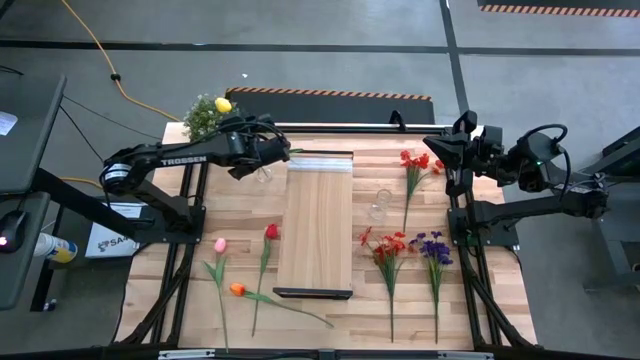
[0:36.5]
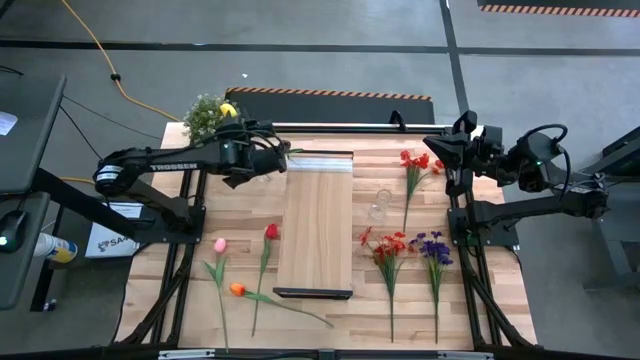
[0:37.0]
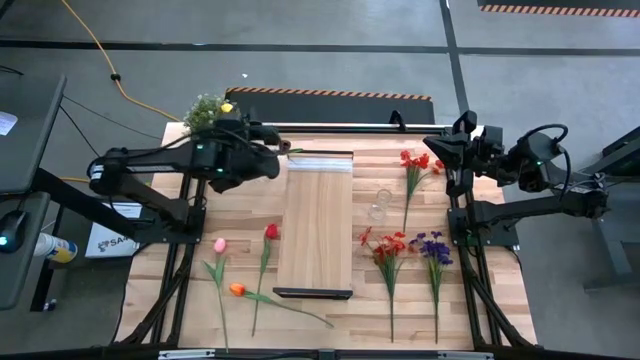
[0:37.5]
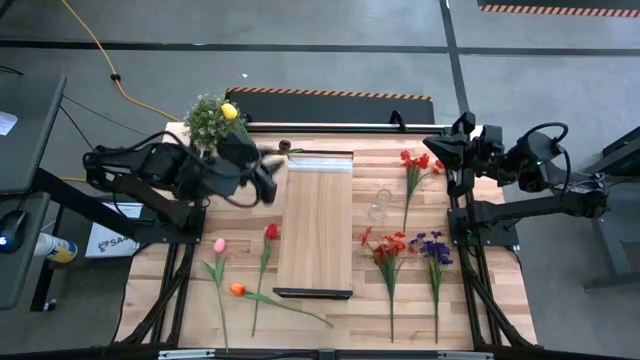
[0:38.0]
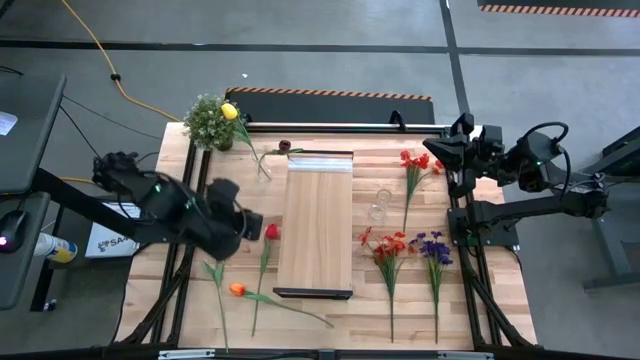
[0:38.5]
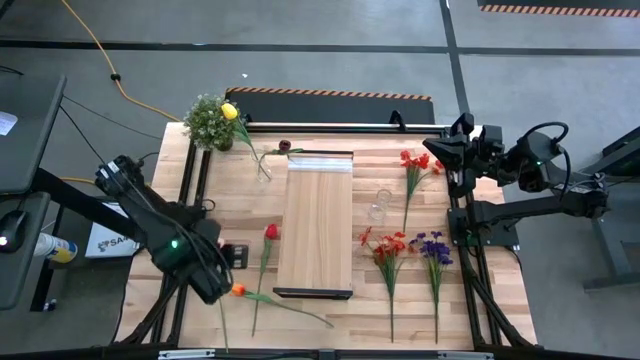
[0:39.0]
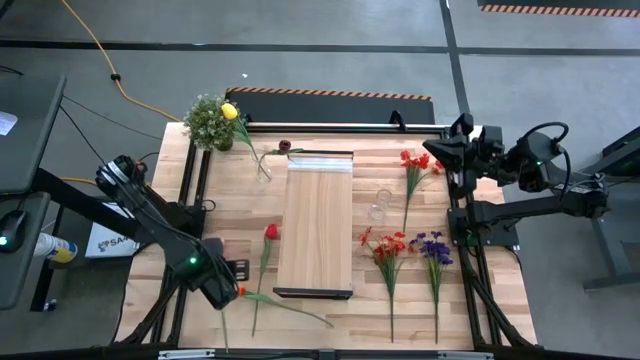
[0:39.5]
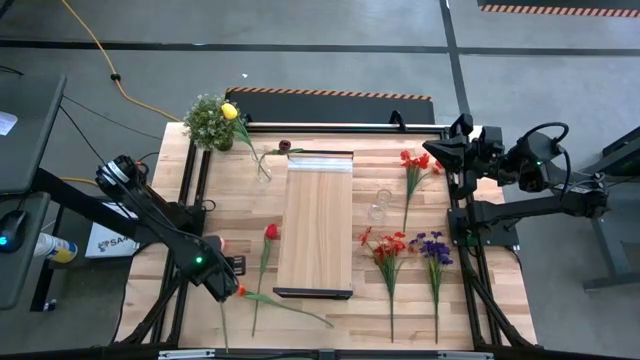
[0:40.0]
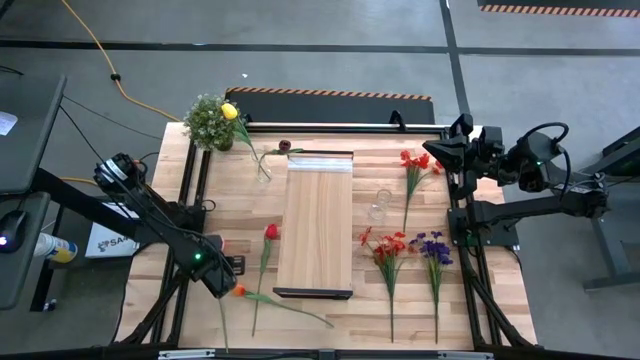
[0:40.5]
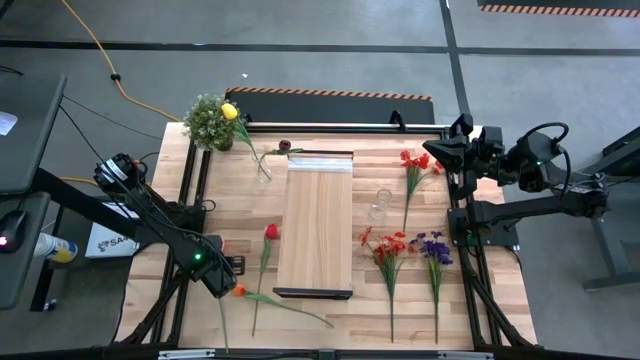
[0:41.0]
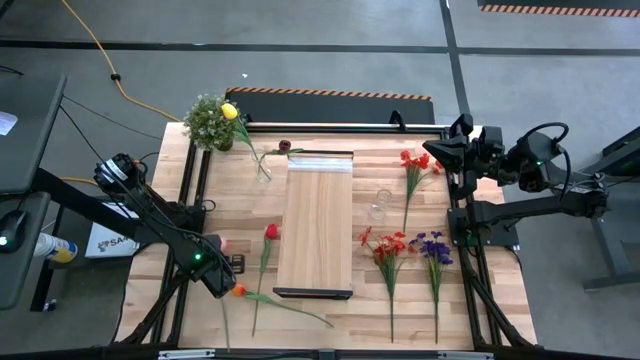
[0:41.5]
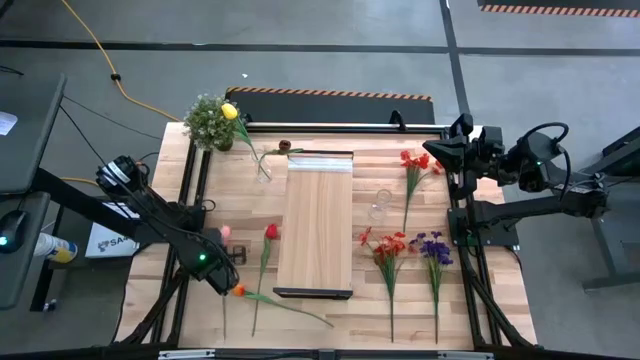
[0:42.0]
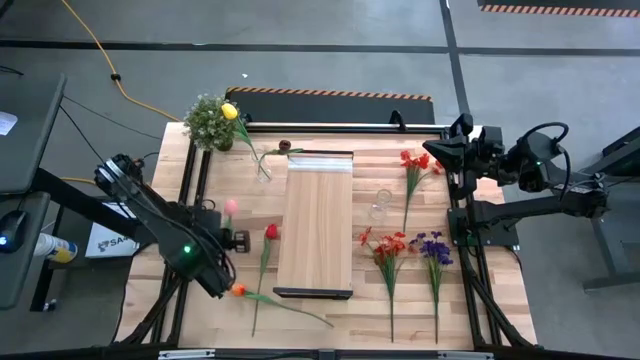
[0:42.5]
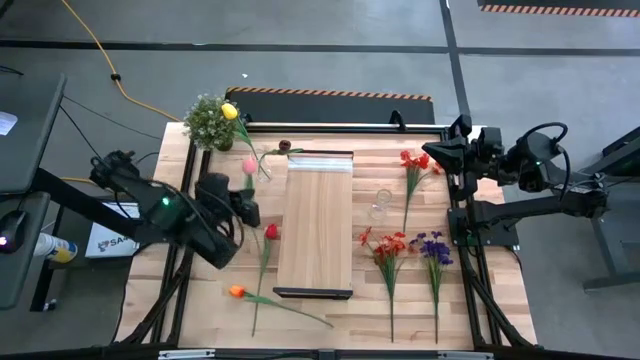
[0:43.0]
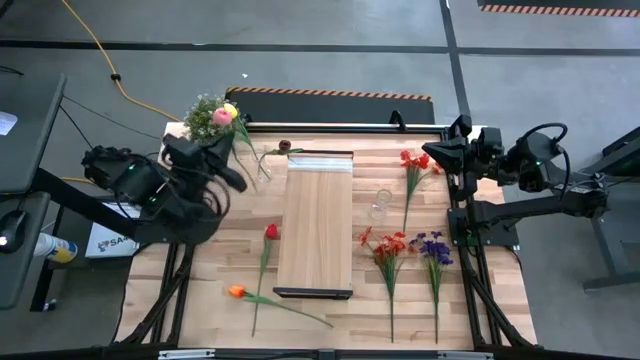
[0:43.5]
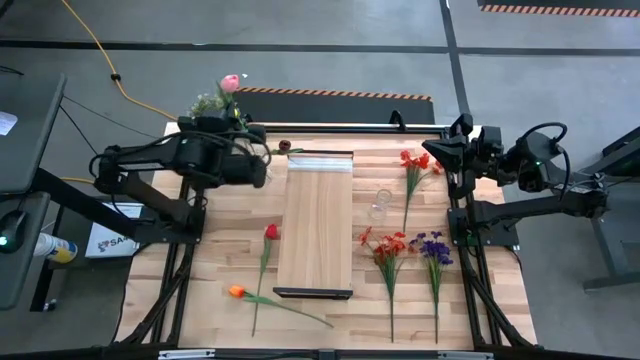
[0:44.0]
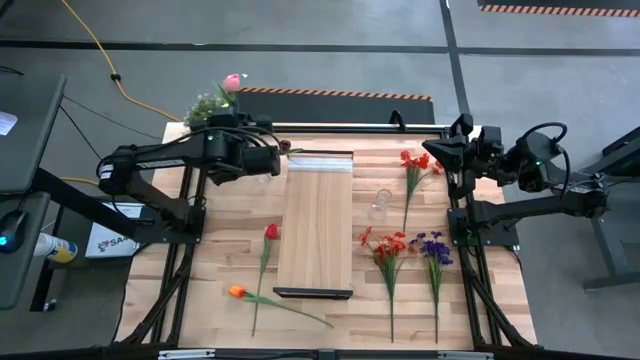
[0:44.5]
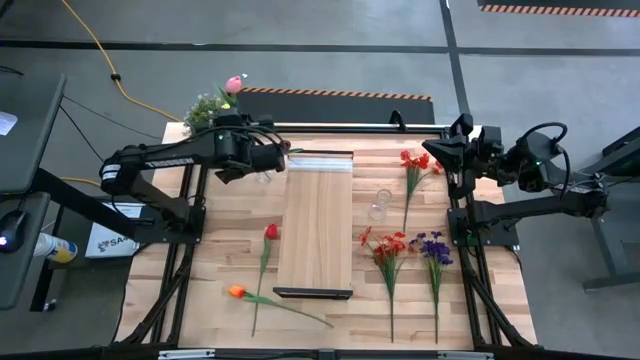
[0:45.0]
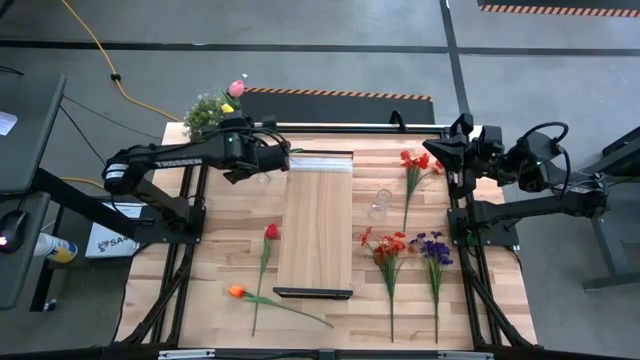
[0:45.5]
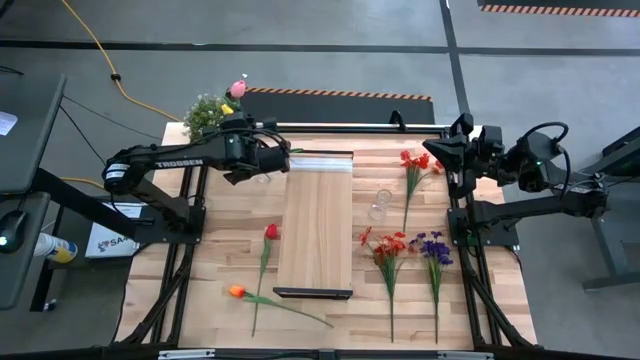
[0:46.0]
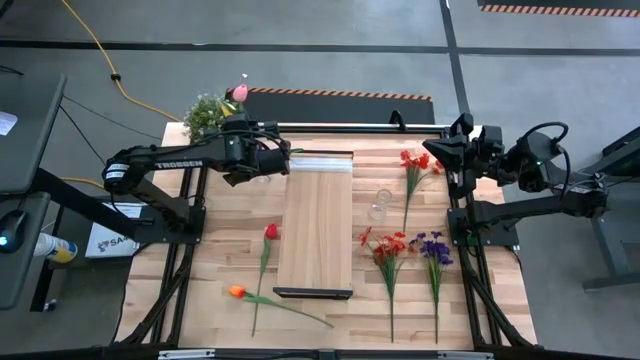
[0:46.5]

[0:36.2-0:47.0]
Task: Pick and place flowers into a vace then onto a shelf
Put the pink flower into the left vase

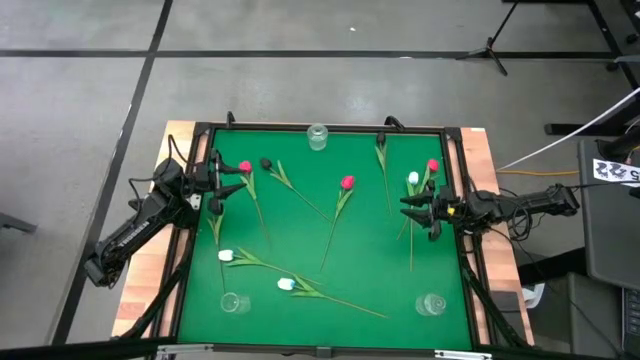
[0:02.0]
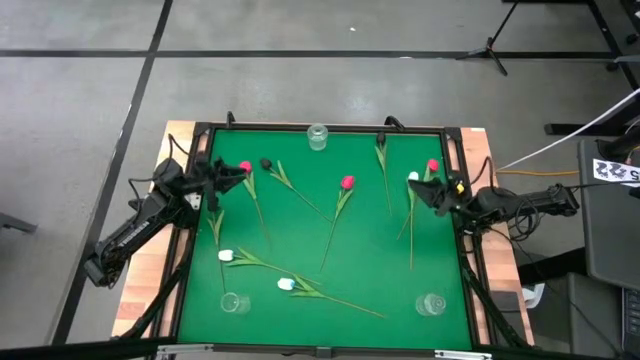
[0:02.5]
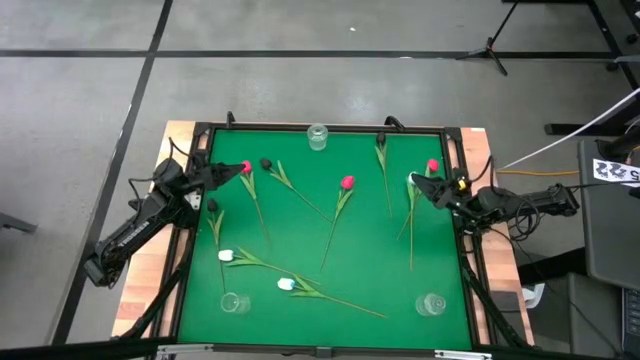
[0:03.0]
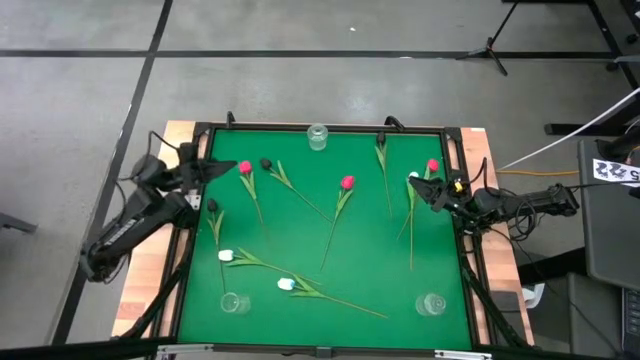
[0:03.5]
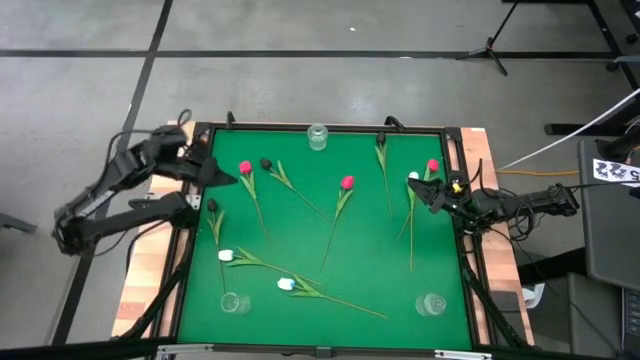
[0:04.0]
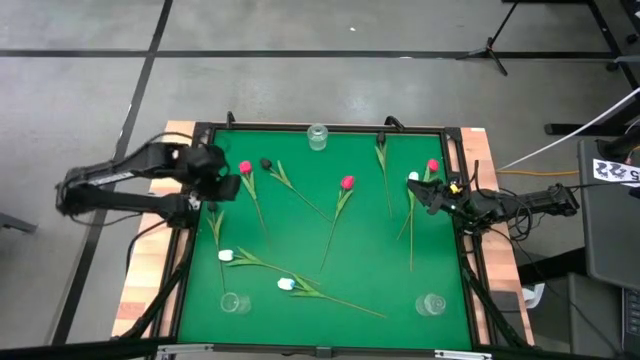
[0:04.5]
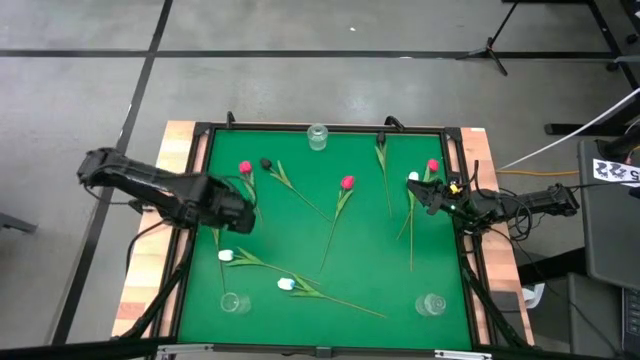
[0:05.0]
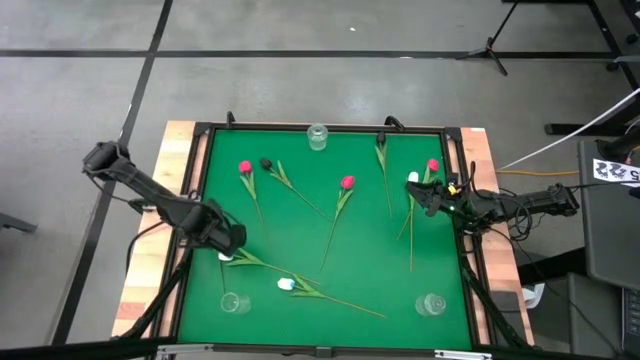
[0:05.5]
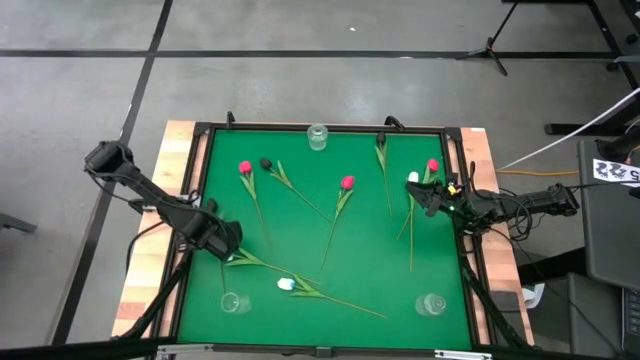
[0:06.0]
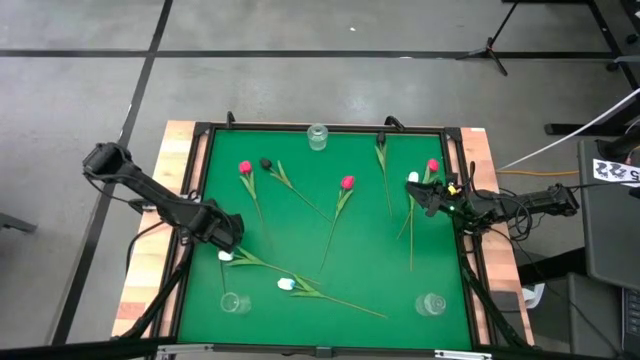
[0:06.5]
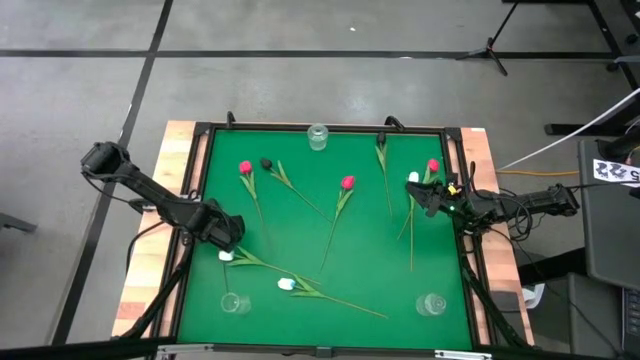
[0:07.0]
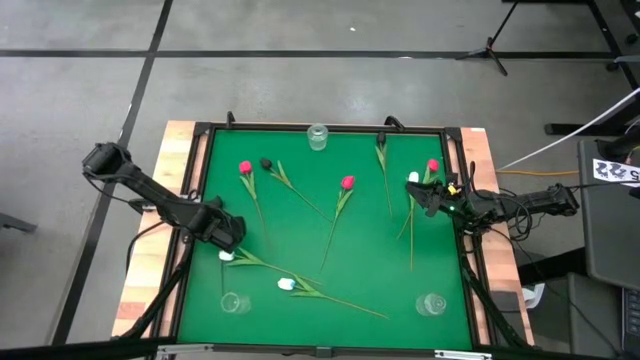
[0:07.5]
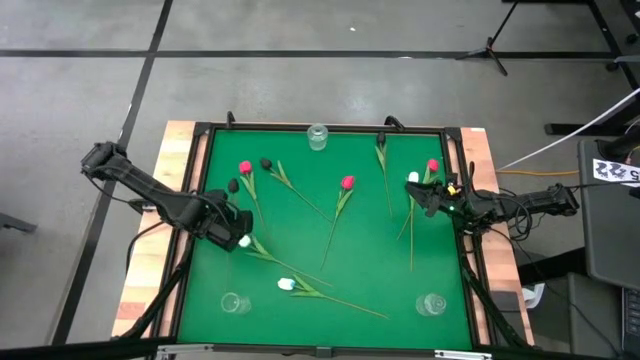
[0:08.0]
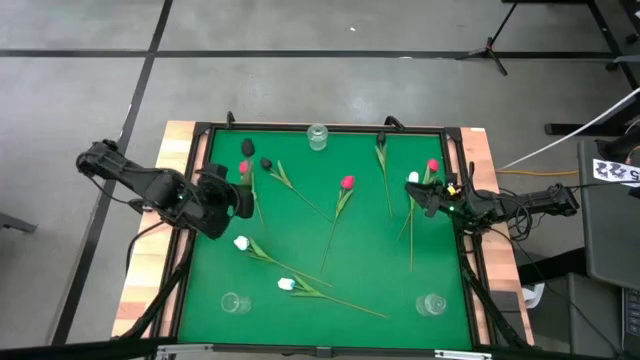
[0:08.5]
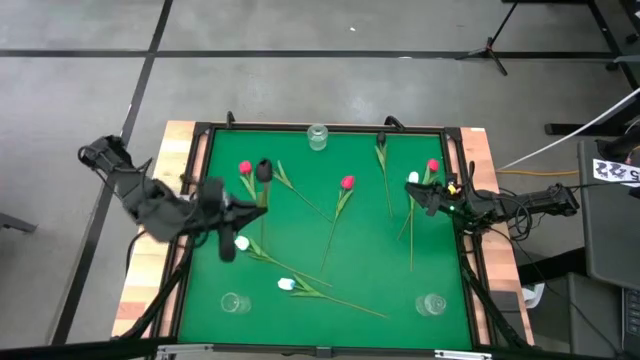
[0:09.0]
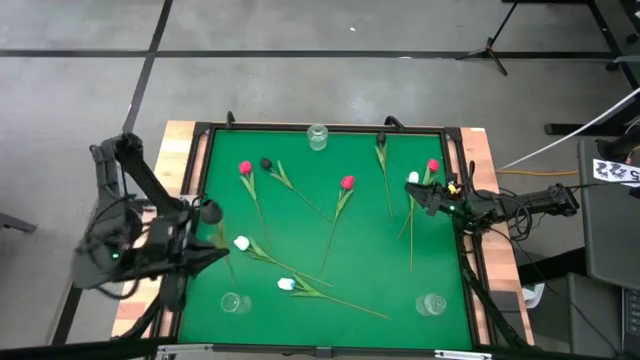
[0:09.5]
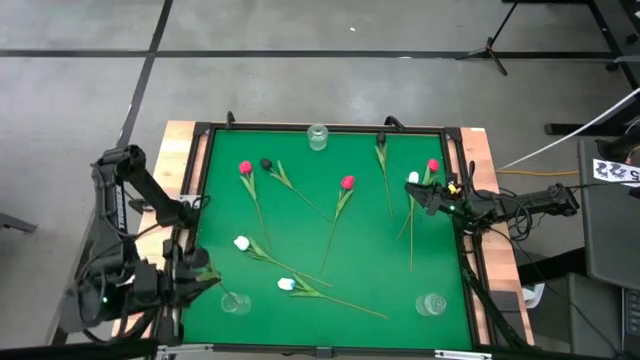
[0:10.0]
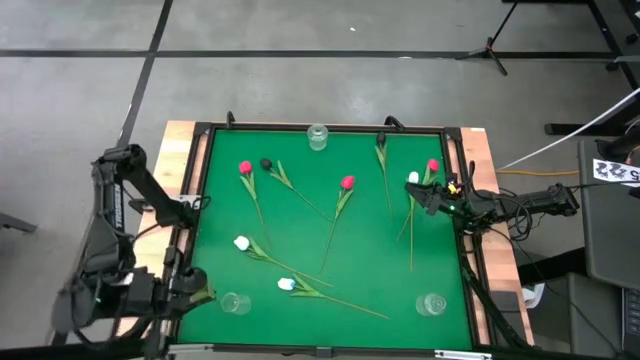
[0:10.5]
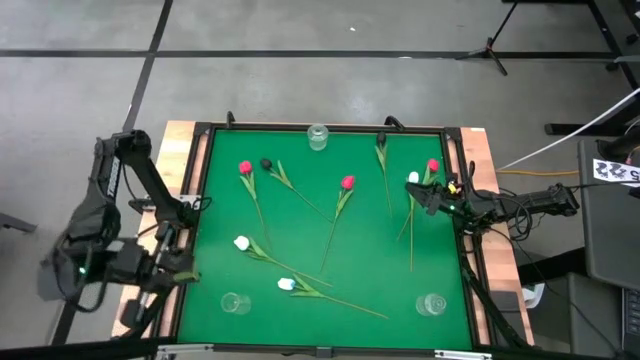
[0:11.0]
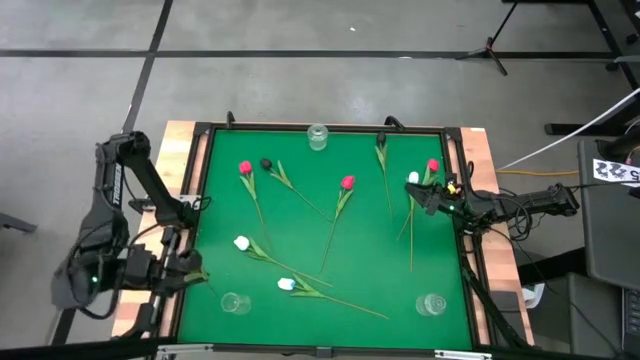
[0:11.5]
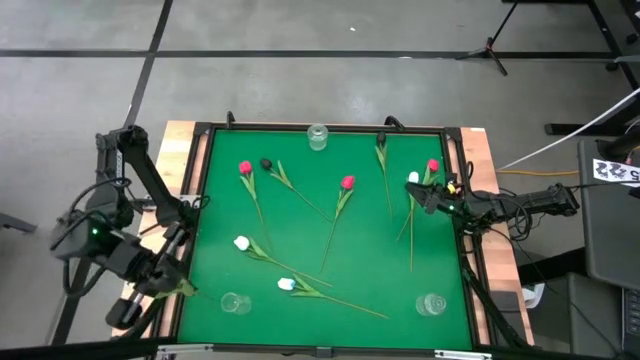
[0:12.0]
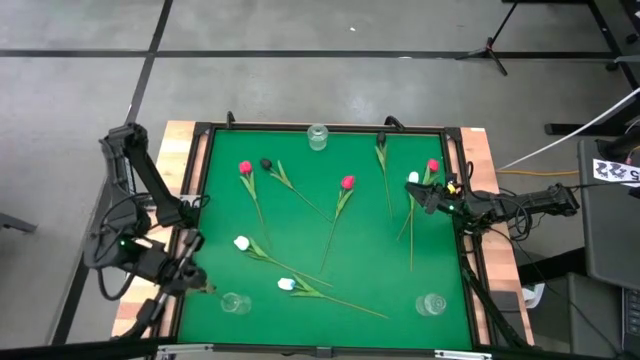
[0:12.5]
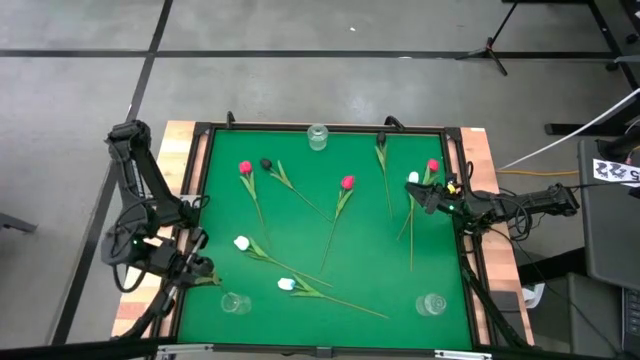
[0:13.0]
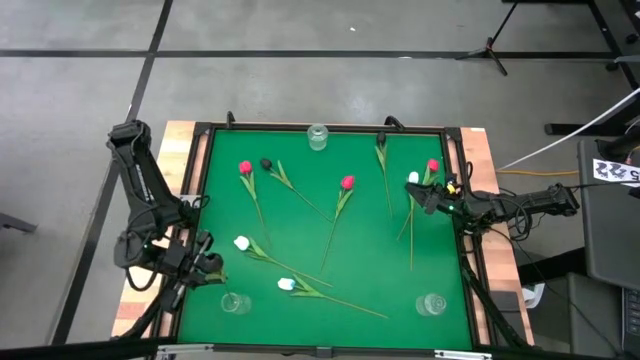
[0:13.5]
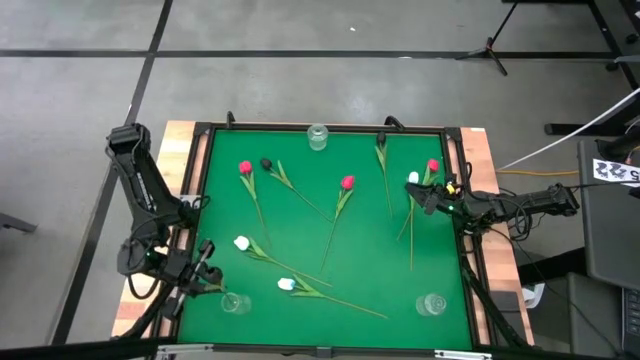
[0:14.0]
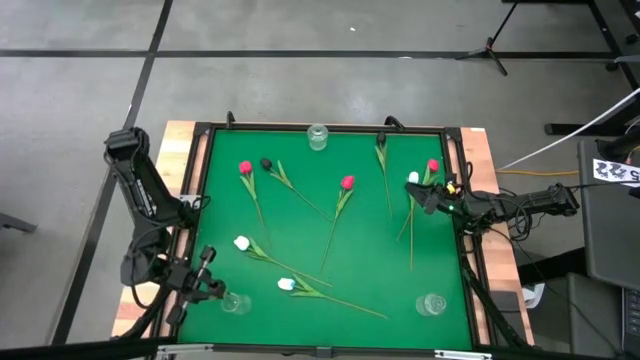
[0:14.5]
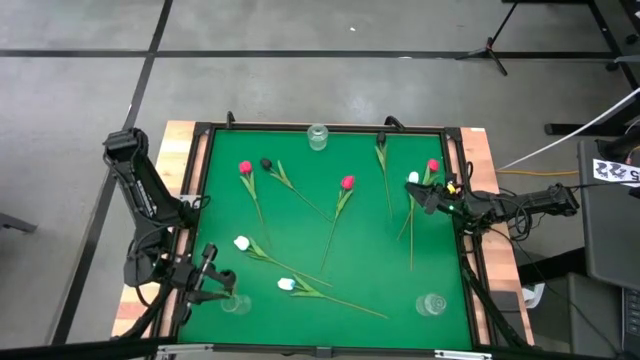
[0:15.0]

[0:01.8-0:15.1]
Task: Sort flowers into vase by color
Put the bottom black flower into the bottom left transparent vase
